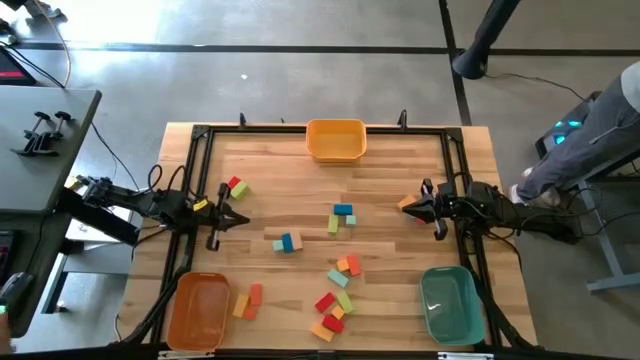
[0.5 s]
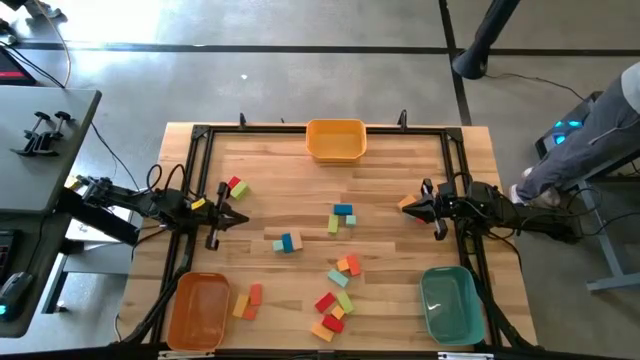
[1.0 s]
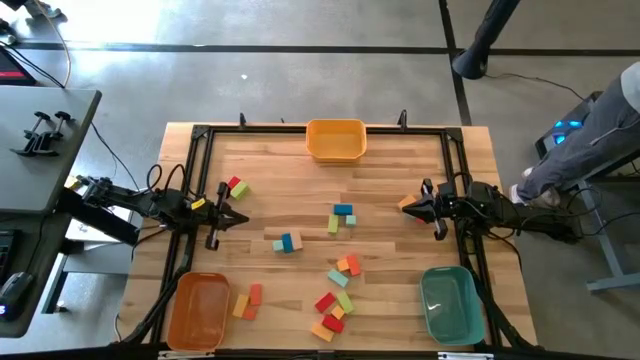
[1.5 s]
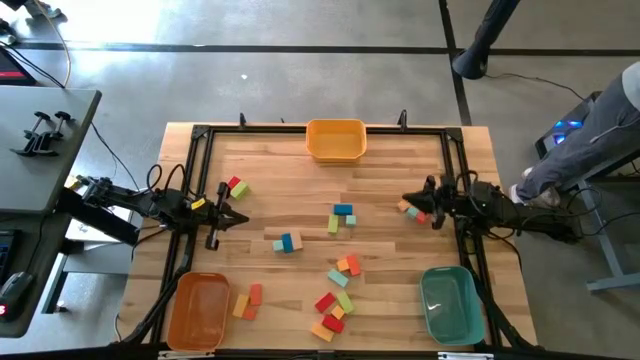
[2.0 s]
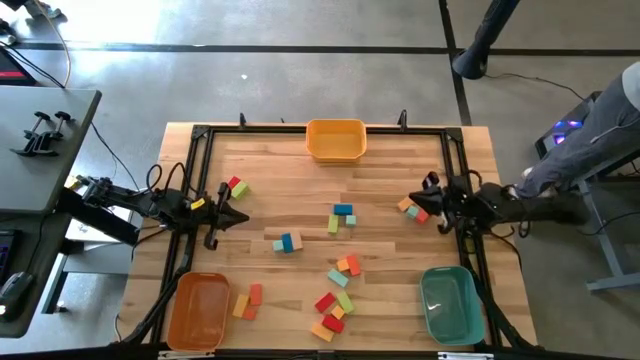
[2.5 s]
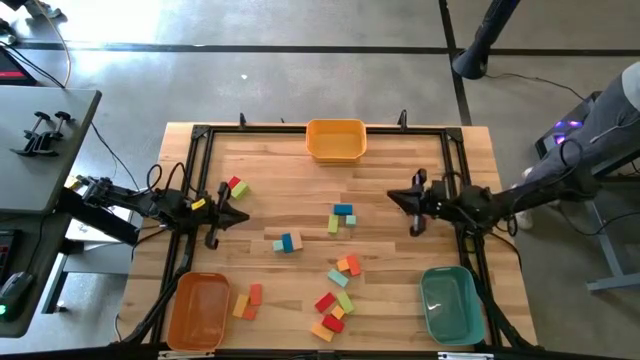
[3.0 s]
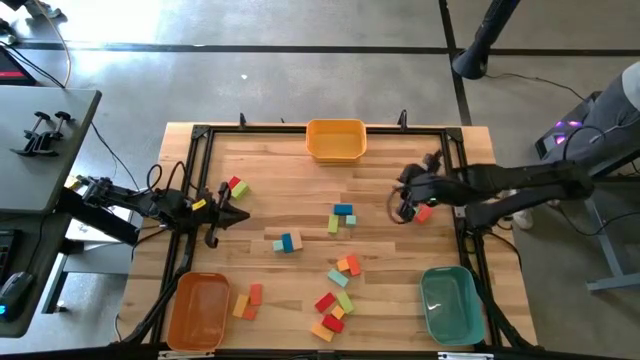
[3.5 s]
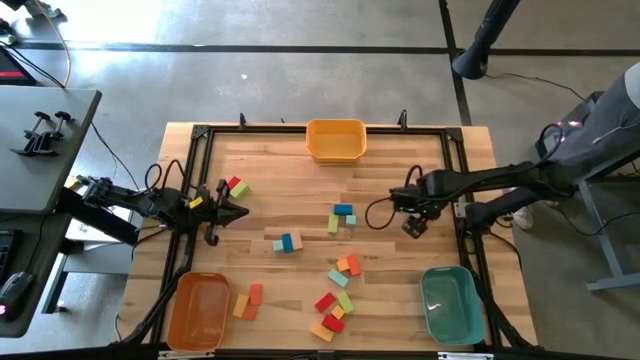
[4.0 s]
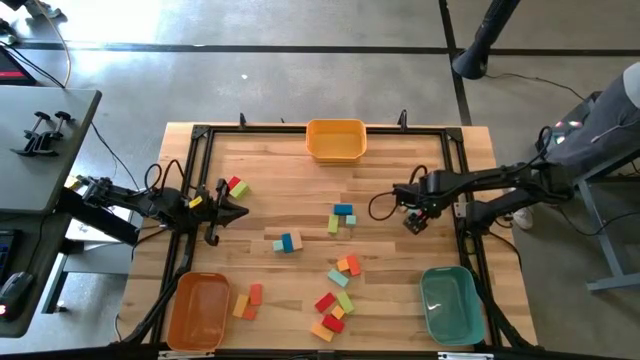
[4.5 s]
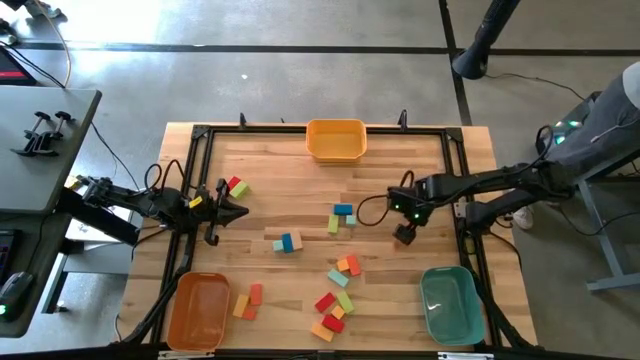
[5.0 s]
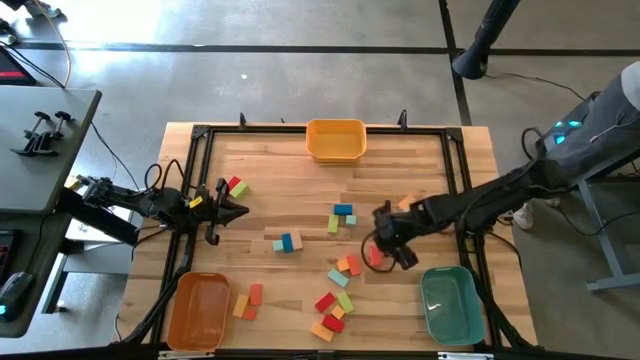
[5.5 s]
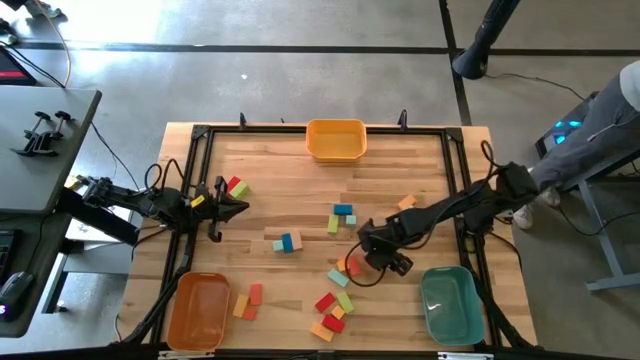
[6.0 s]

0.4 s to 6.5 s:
Task: Sort blocks by size
Put the large orange rectangle block into the green bin

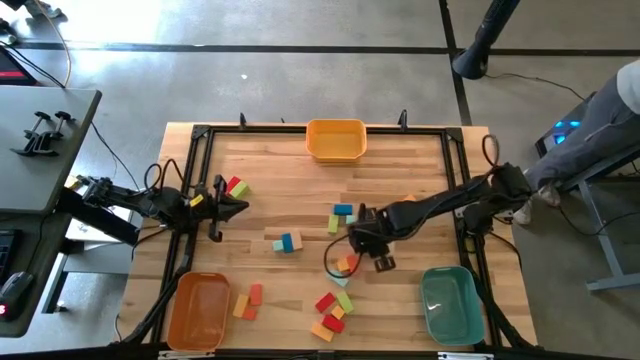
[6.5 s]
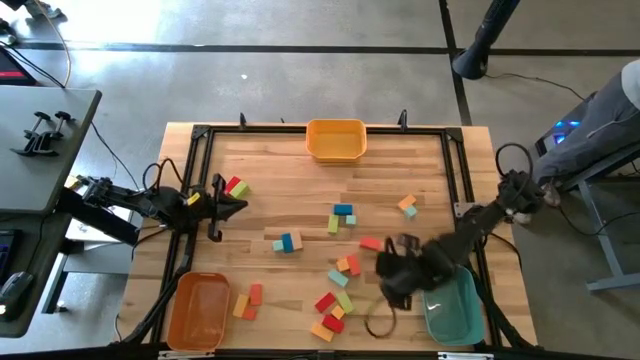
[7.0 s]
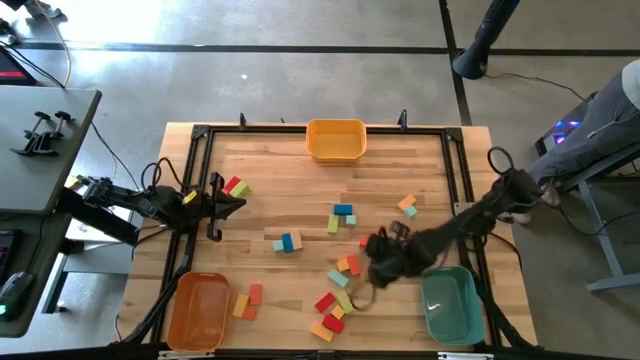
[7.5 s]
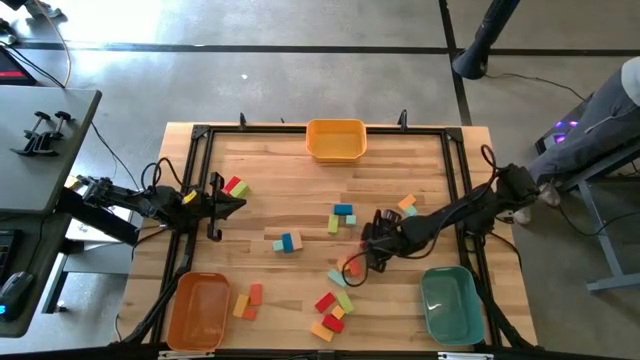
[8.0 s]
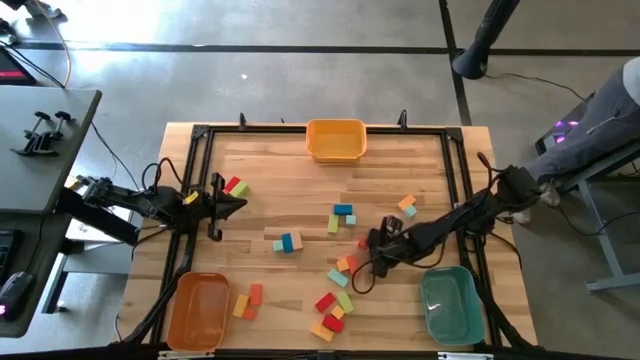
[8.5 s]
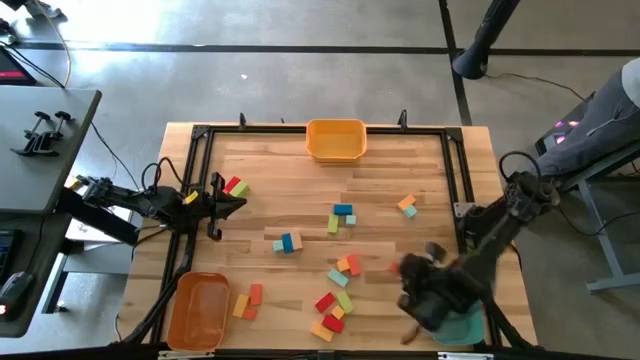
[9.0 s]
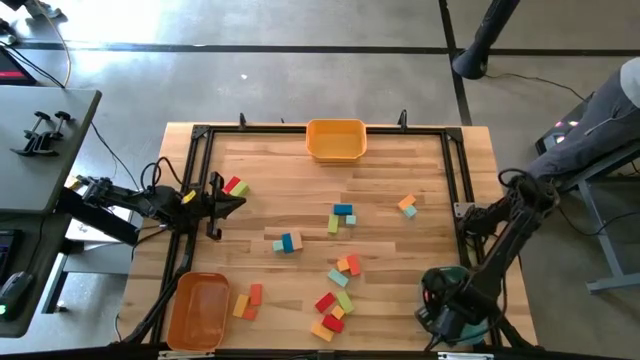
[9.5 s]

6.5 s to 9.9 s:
Put the large orange rectangle block into the green bin

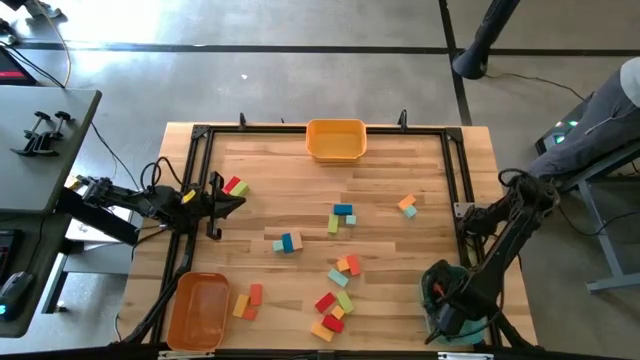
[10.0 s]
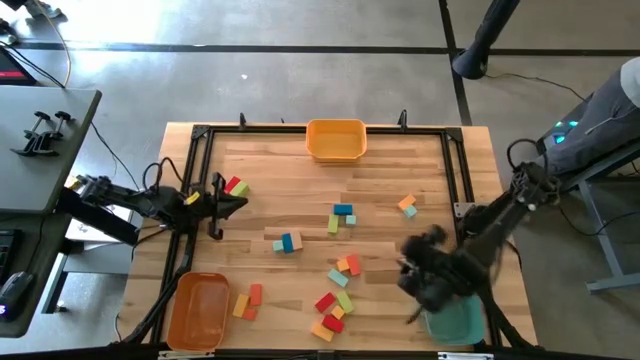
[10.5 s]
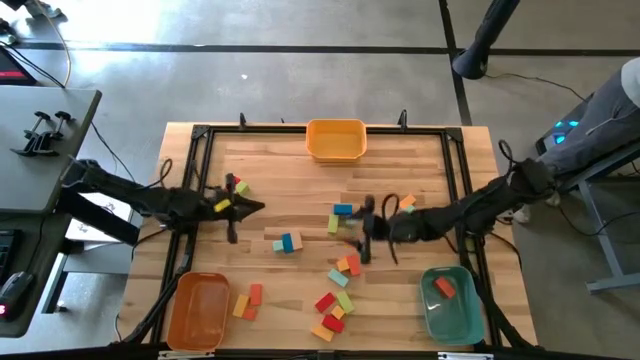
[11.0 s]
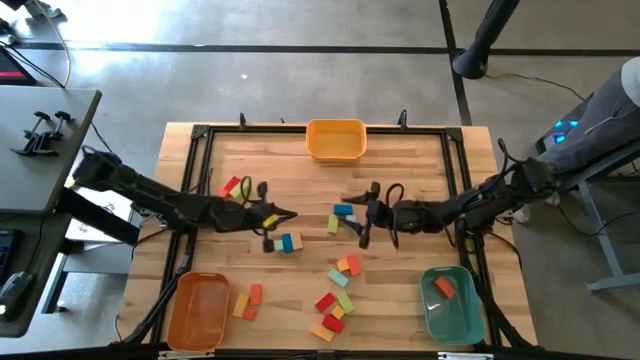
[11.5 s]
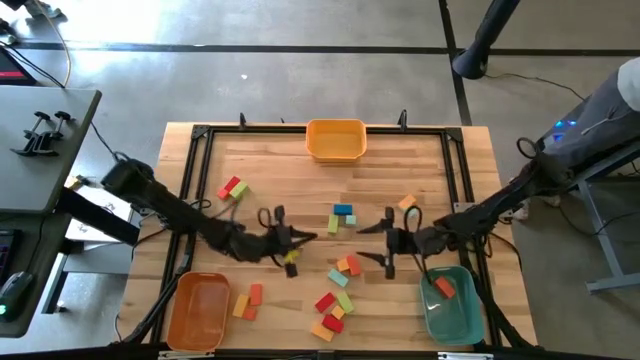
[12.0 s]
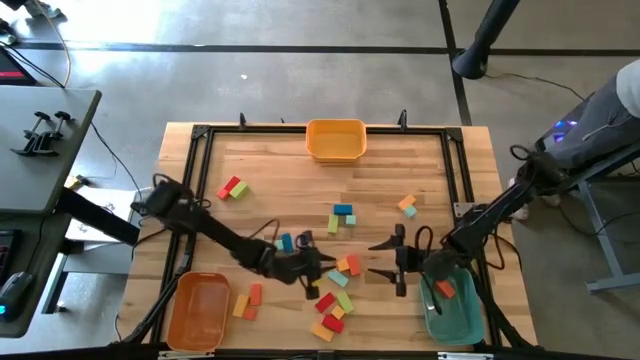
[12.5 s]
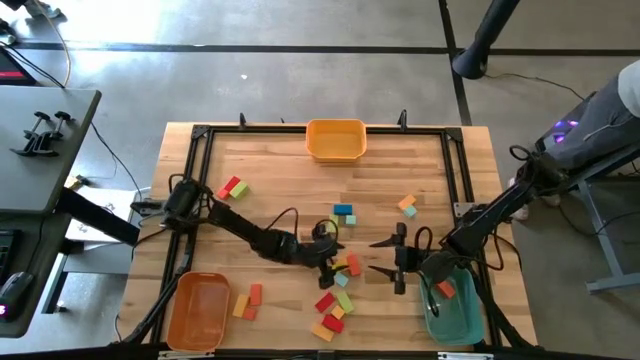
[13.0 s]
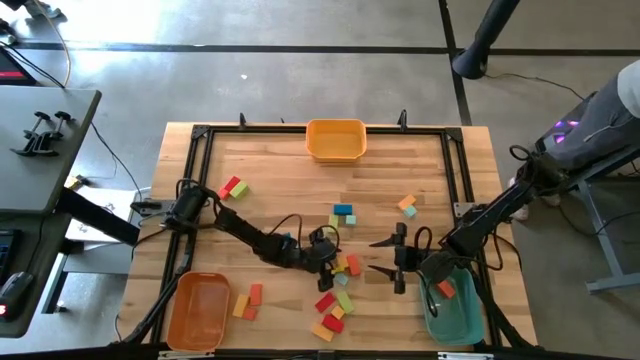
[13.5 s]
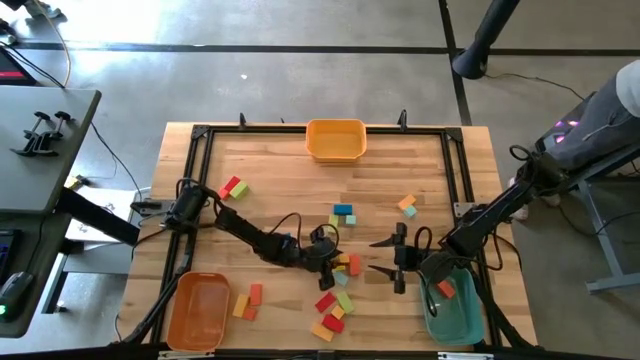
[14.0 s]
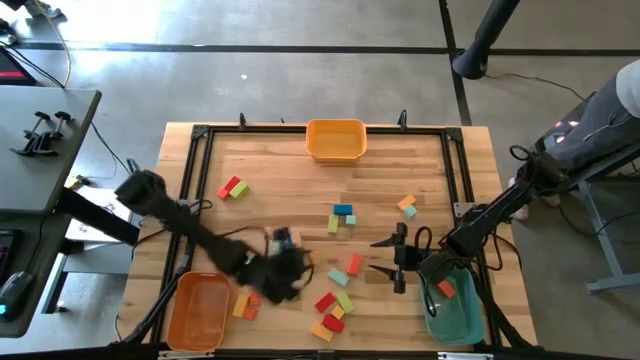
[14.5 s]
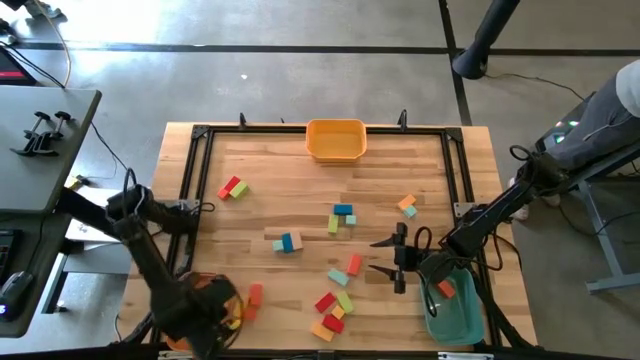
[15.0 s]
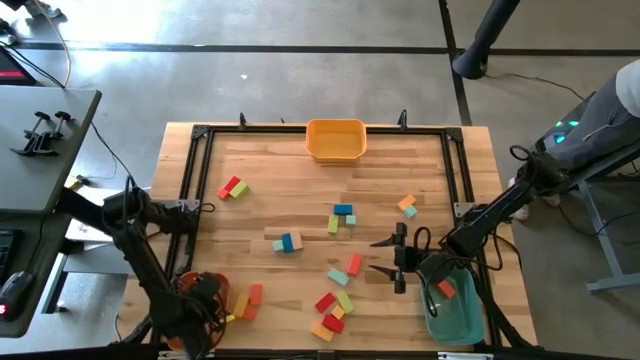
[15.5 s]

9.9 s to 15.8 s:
Put the yellow square block into the orange bin

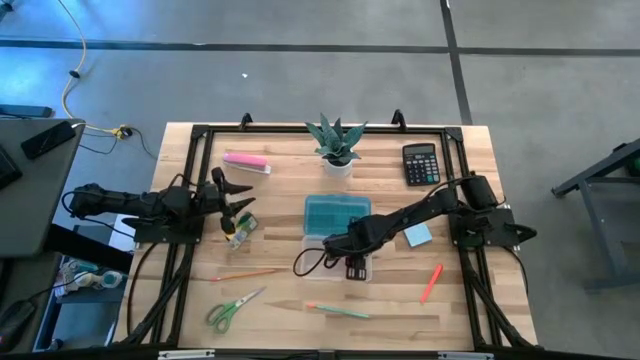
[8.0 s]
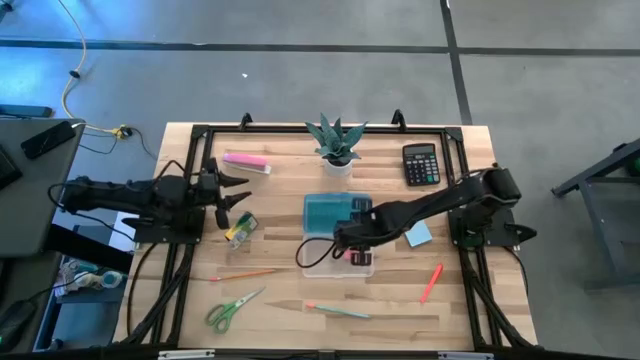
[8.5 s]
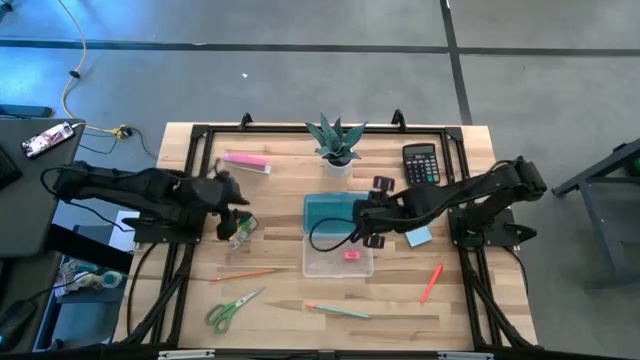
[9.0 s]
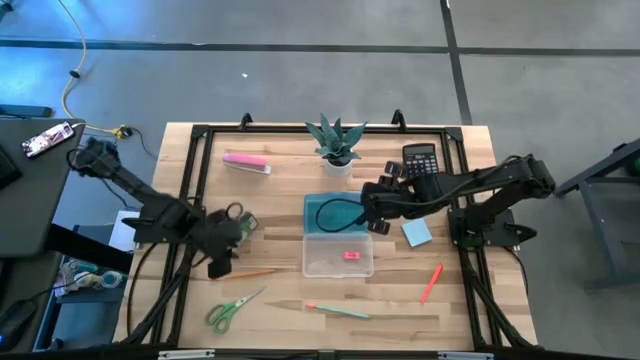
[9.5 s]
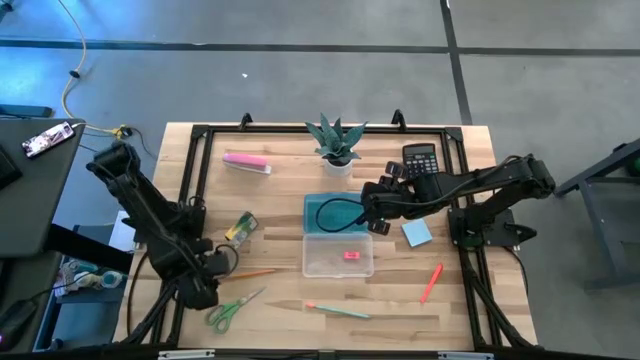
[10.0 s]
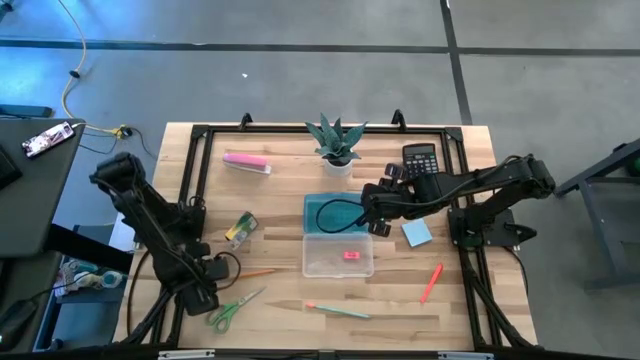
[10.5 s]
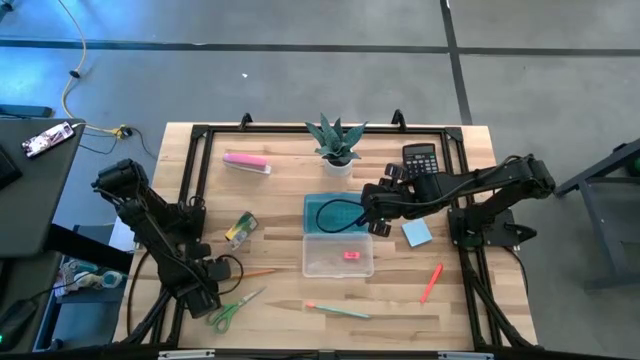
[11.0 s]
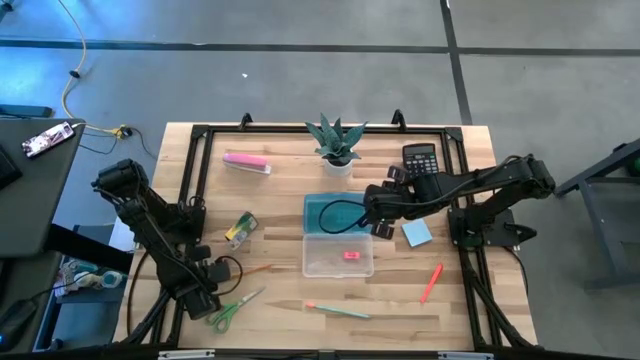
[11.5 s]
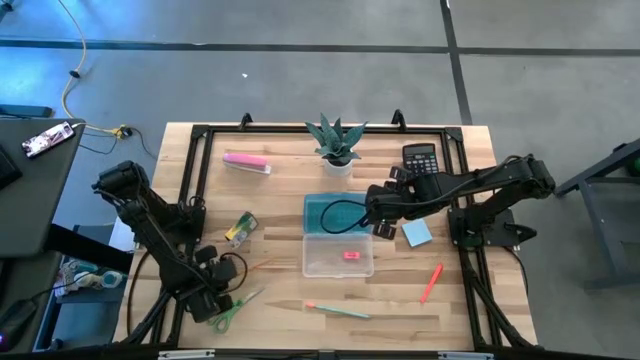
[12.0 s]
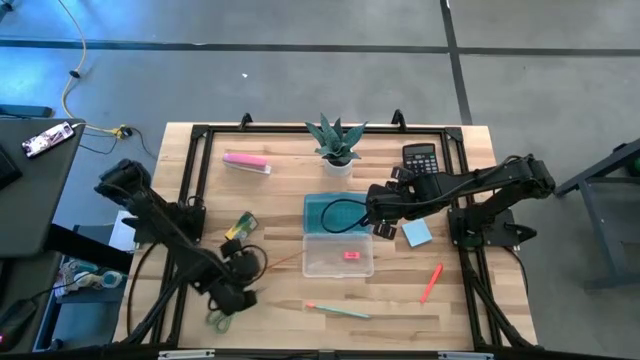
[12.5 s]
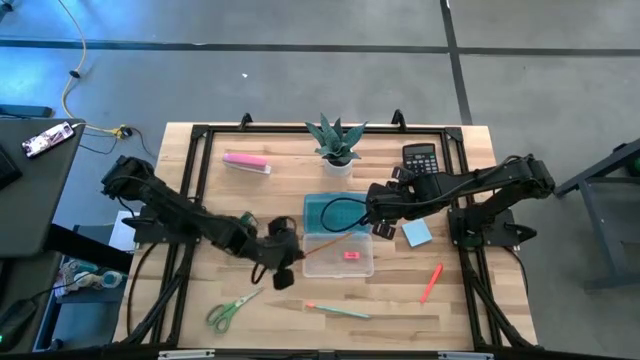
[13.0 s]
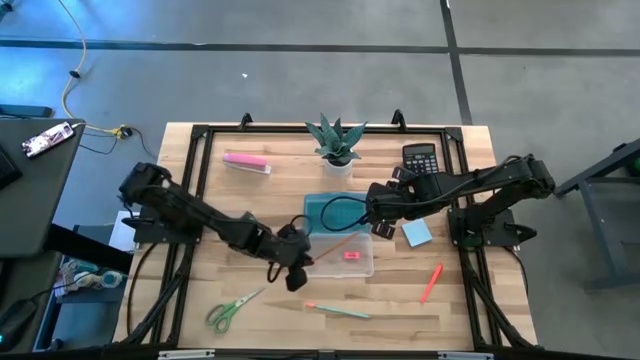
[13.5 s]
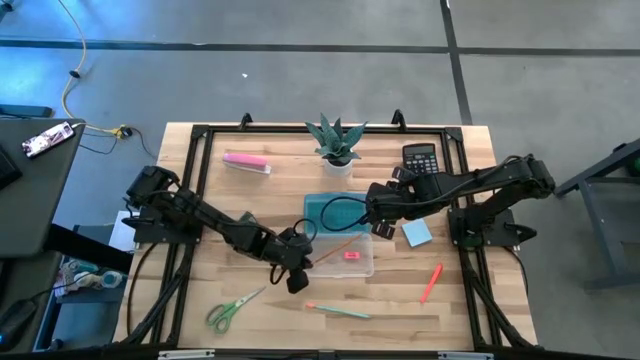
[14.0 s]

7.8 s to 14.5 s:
Task: Pack school essentials
Put the yellow pencil into the blue supply box
